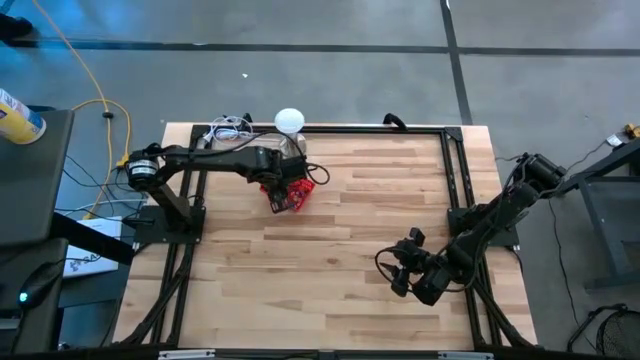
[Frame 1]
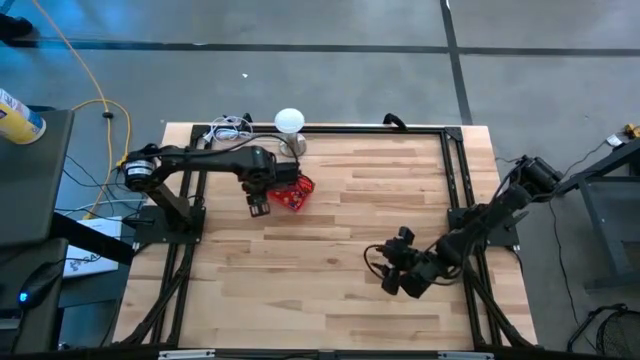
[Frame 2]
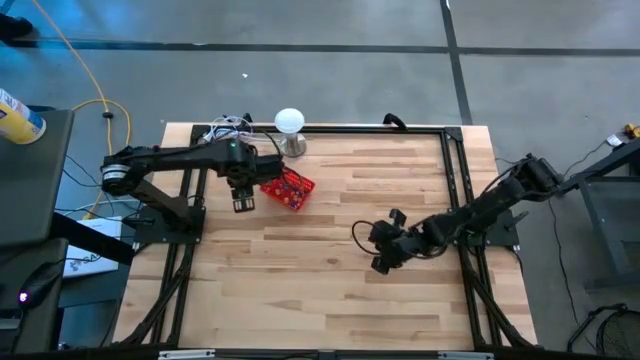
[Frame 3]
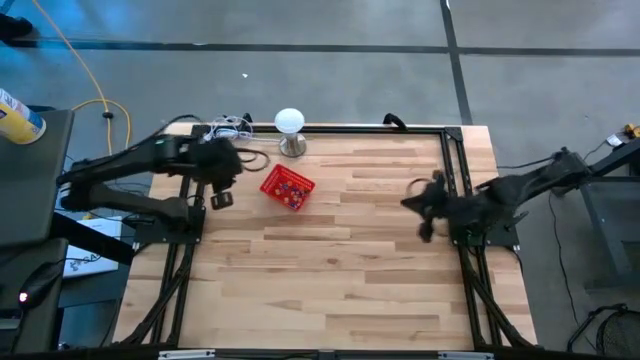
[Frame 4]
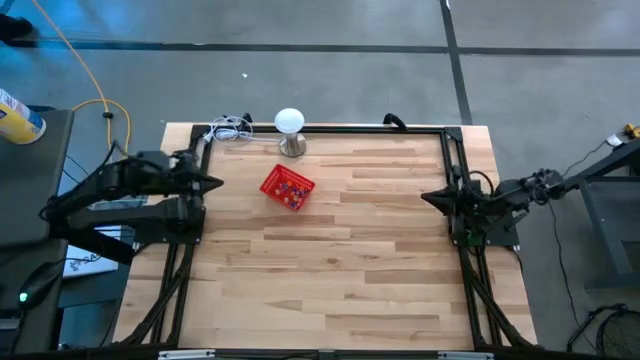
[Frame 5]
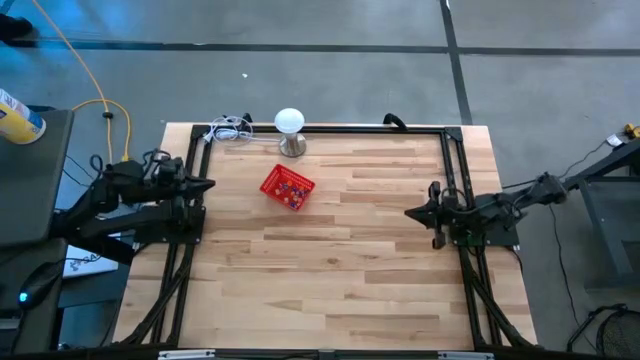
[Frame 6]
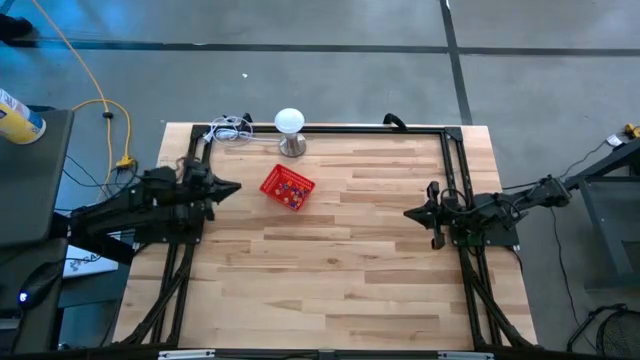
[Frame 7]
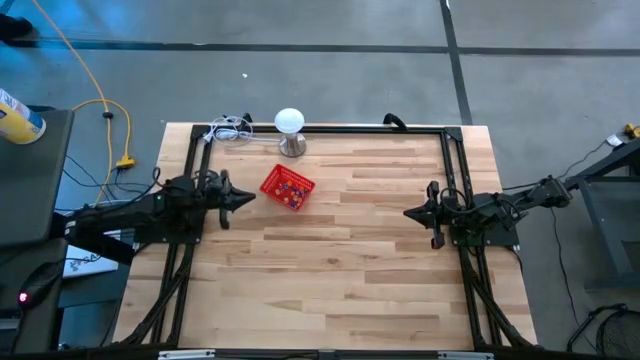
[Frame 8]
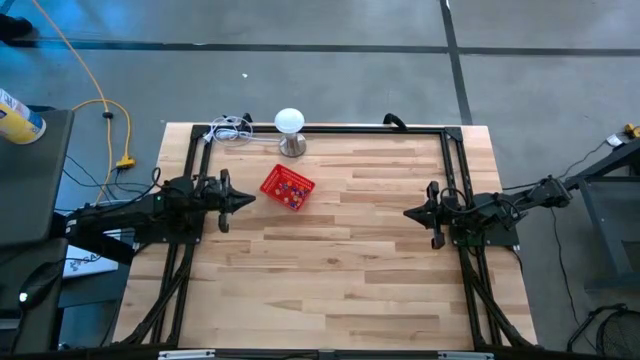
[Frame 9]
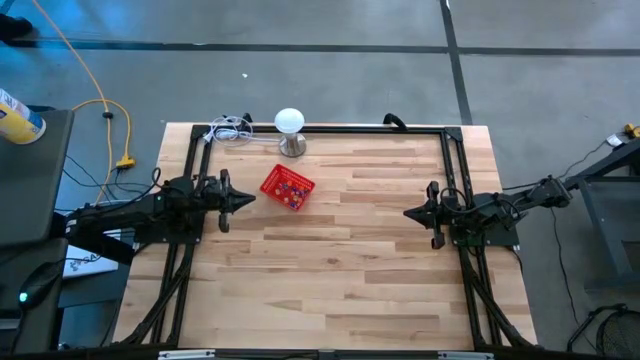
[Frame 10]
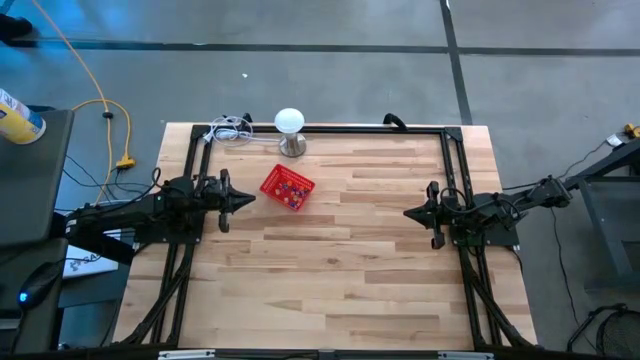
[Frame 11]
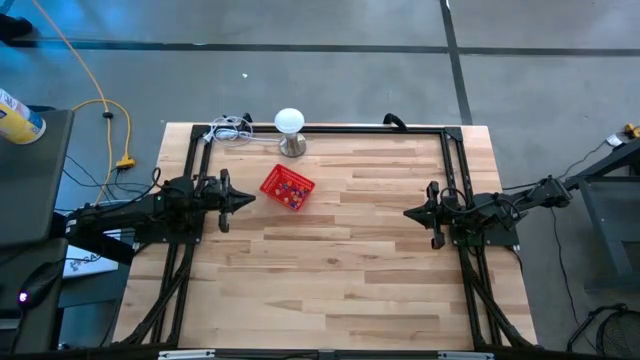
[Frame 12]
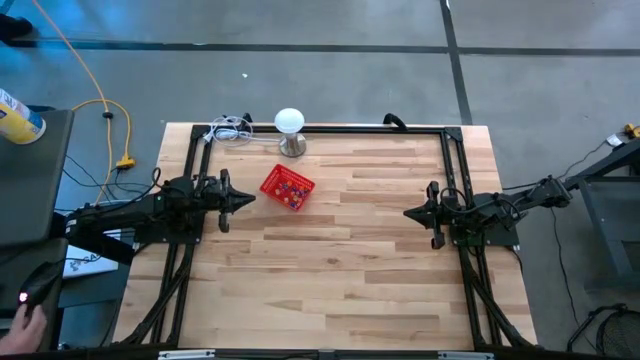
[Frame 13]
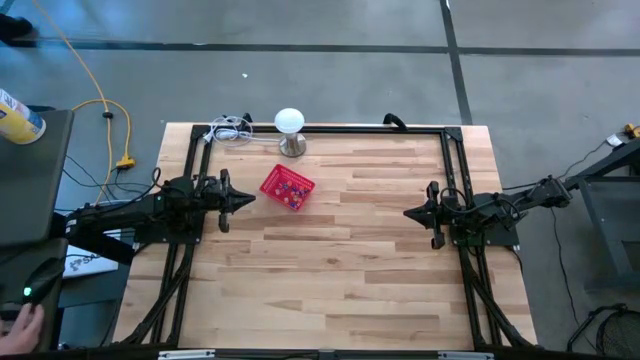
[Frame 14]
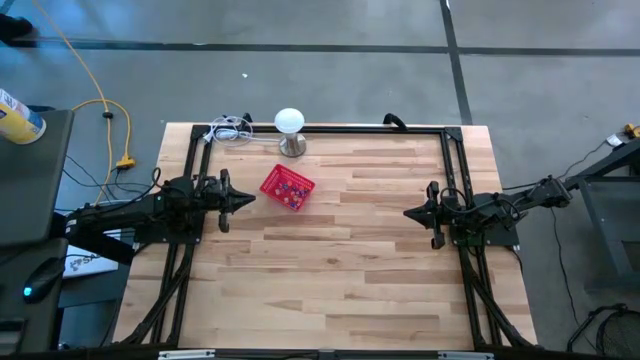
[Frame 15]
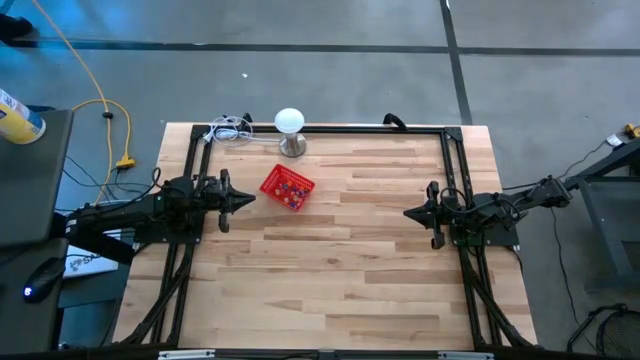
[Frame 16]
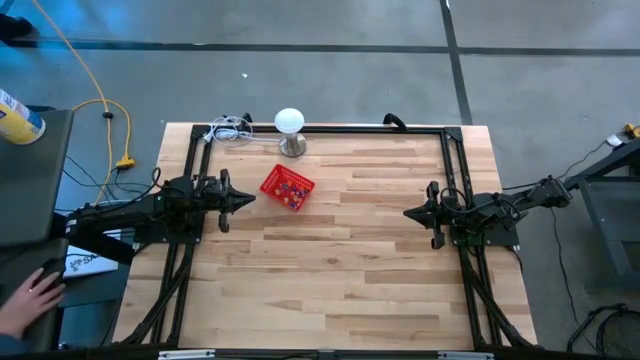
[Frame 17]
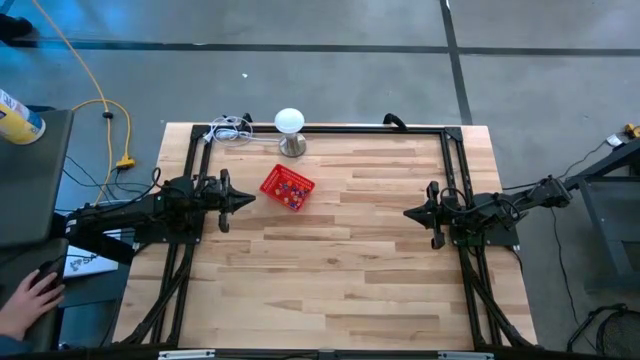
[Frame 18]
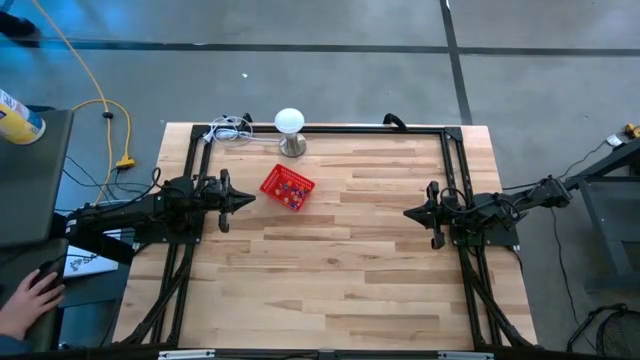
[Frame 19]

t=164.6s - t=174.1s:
Task: Pick & Place Dice
Return to Home Position

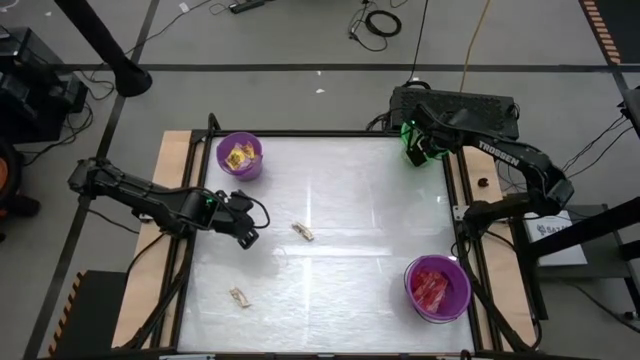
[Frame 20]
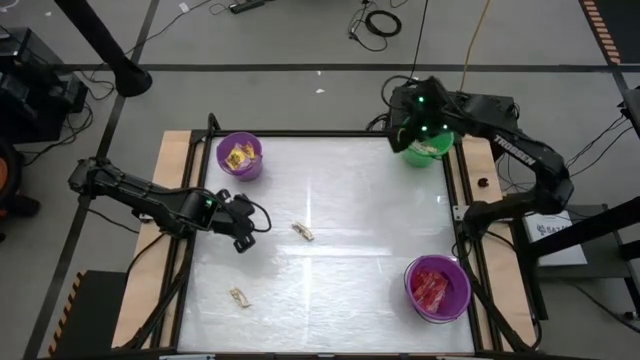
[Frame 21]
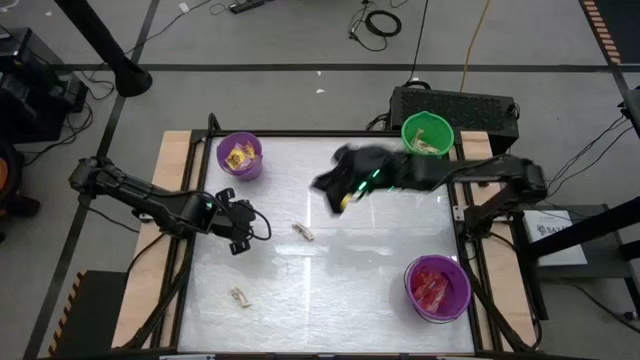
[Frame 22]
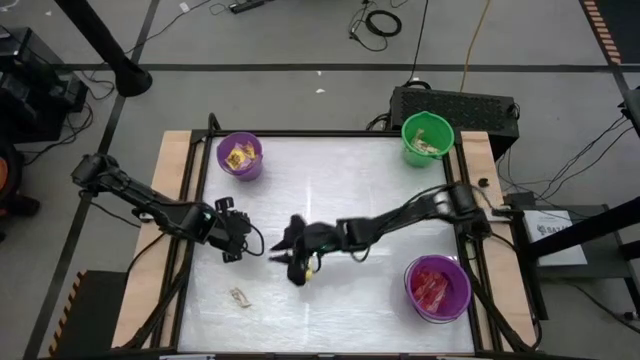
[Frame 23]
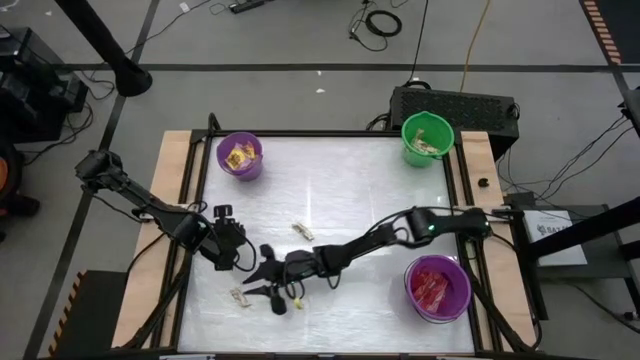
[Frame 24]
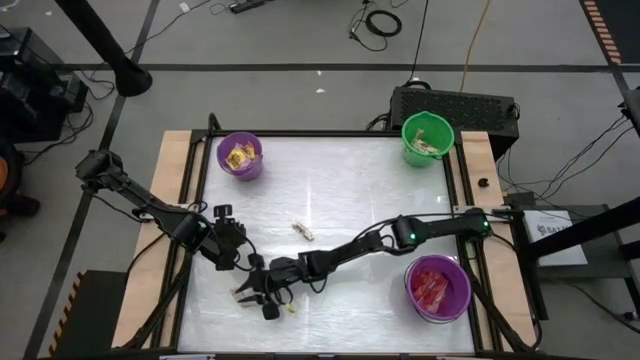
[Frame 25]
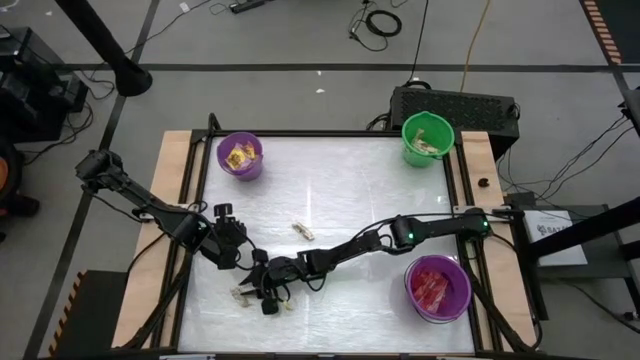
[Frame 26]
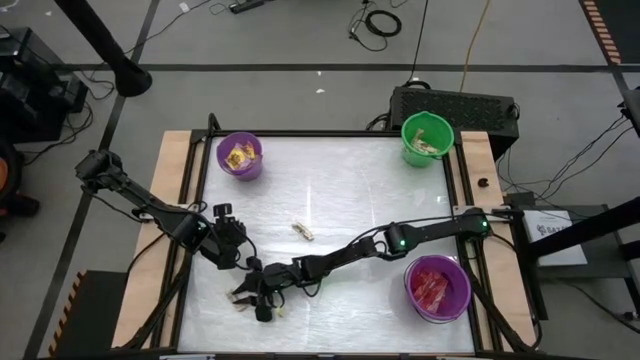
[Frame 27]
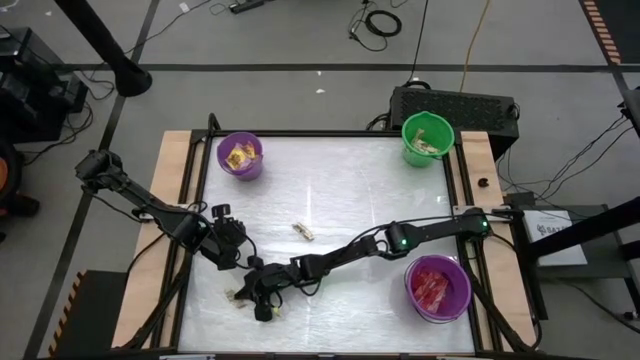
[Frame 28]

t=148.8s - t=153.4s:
Task: Sort candy by brand, put in halloween buckets
Put the white candy into the green bucket

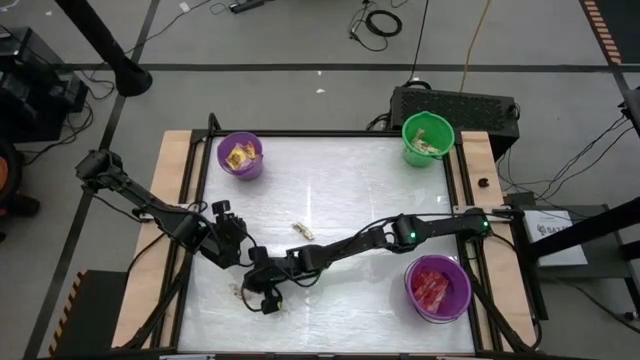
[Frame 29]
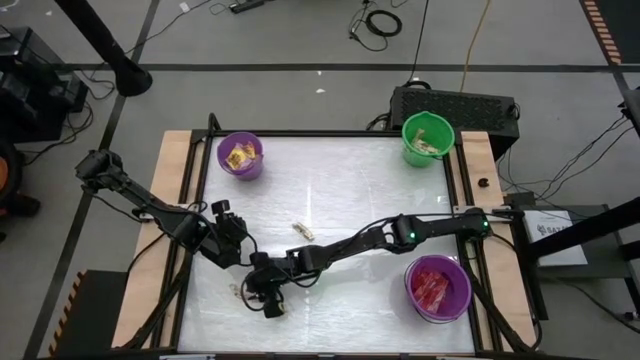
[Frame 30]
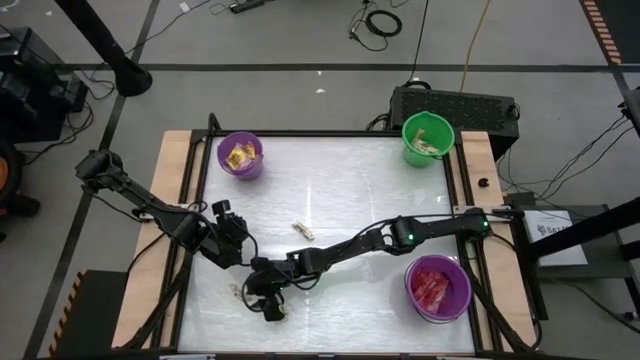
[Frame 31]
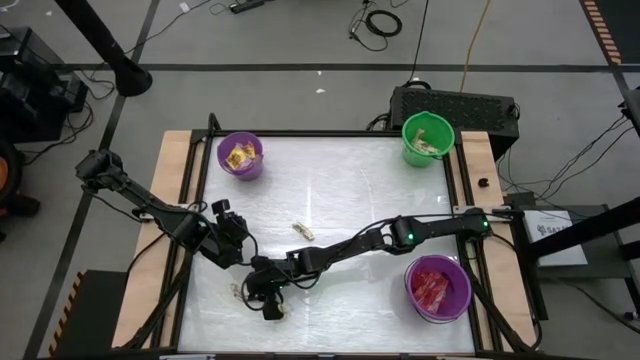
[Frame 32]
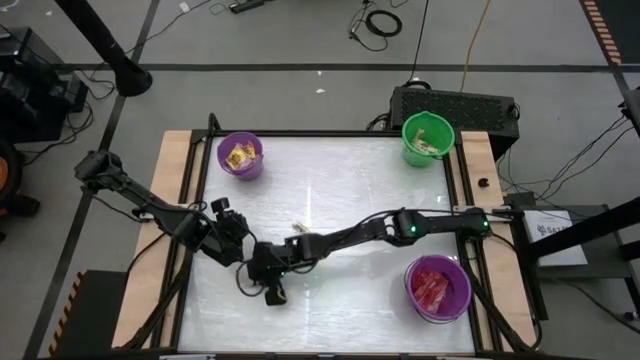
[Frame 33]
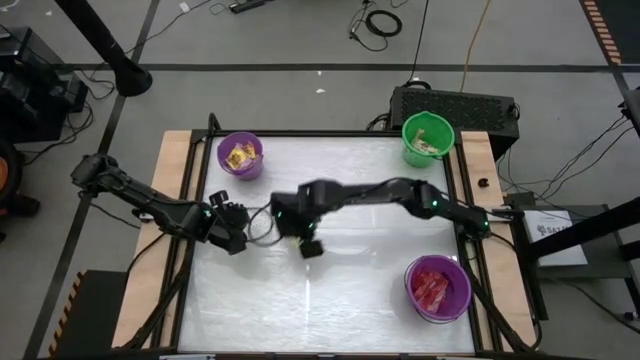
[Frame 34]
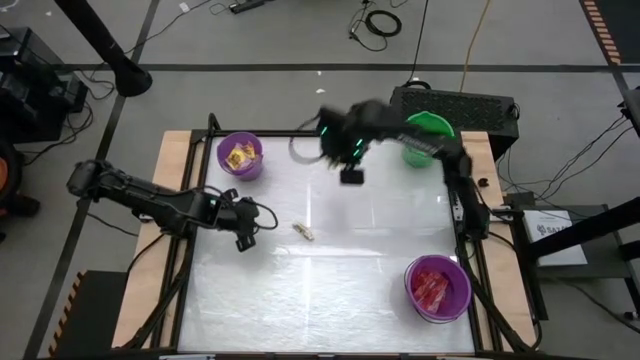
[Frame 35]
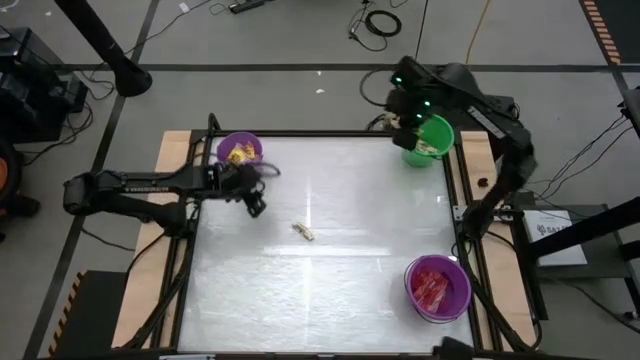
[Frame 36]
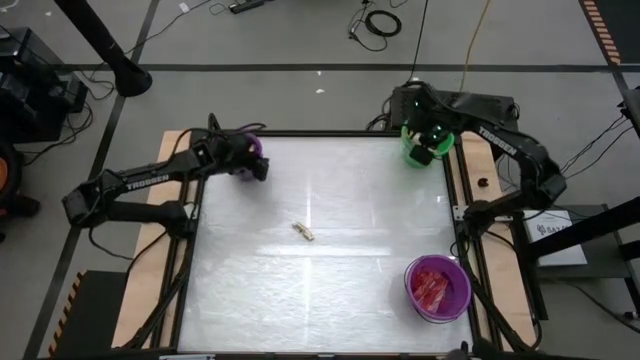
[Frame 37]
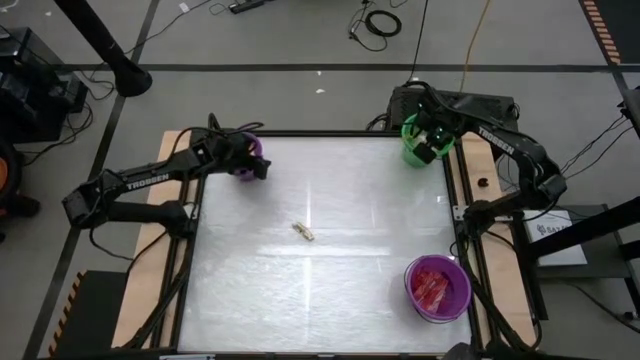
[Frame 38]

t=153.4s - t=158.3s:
Put the white candy into the green bucket
